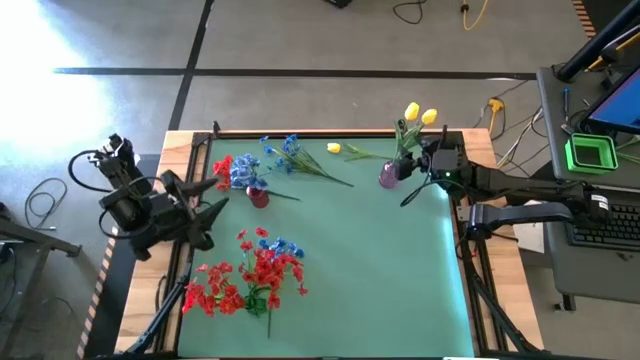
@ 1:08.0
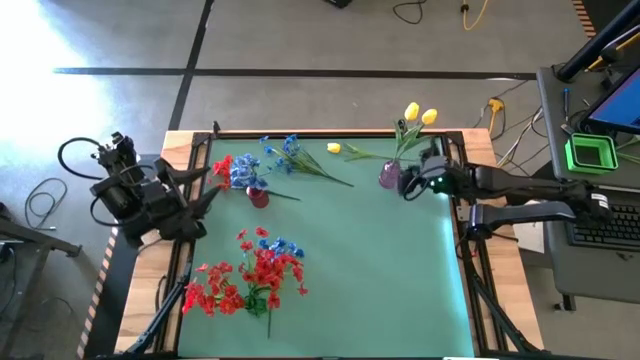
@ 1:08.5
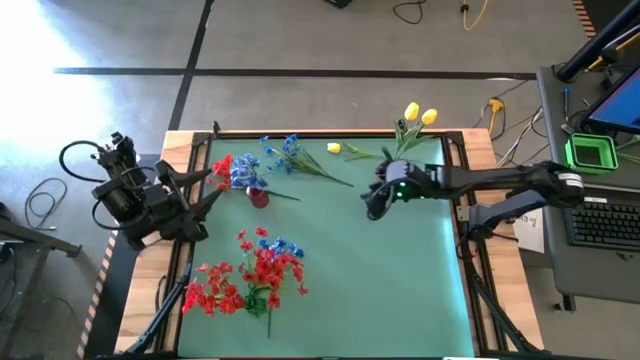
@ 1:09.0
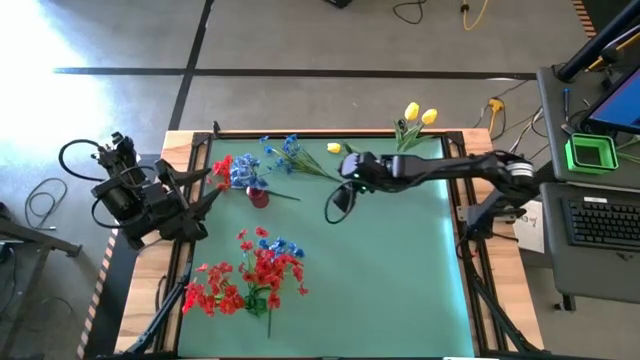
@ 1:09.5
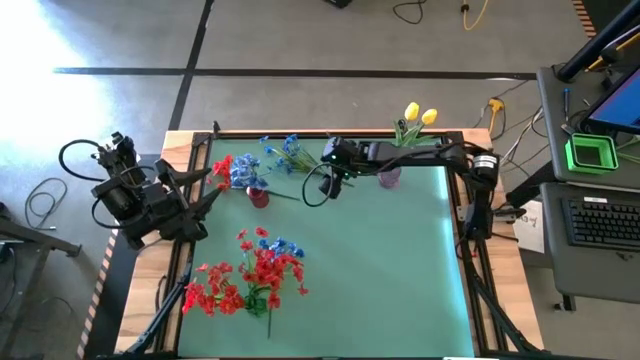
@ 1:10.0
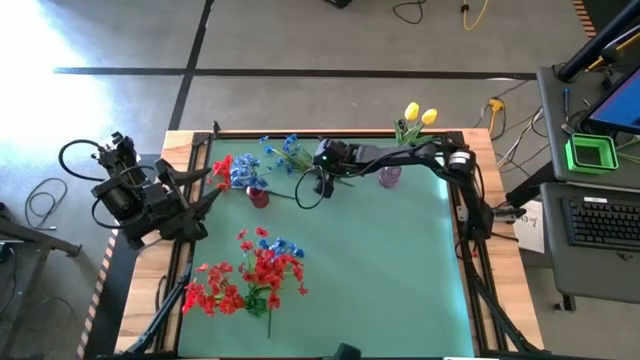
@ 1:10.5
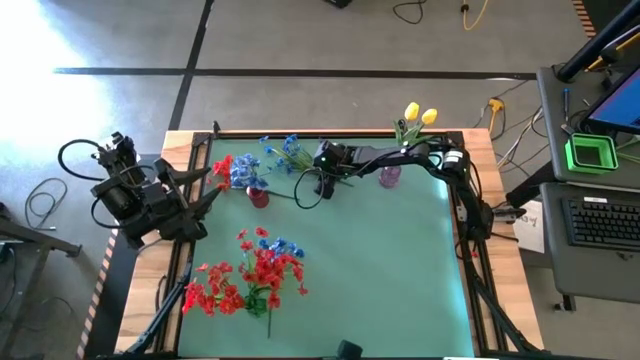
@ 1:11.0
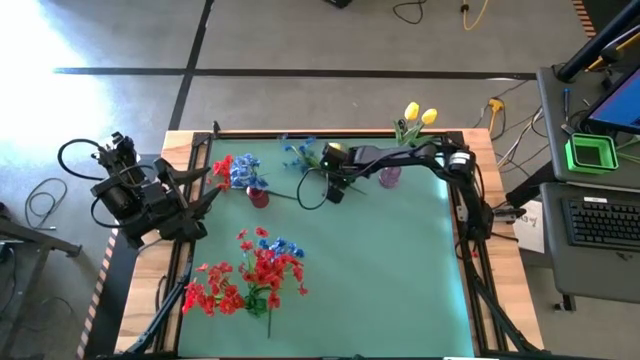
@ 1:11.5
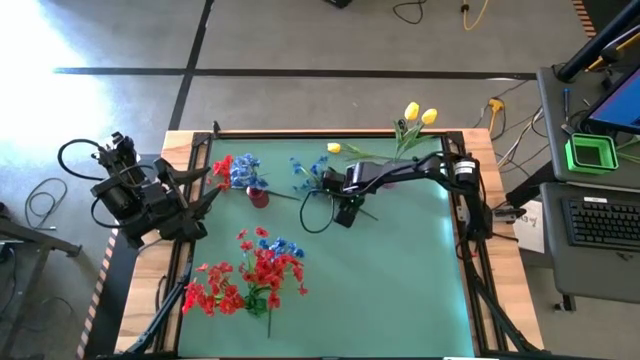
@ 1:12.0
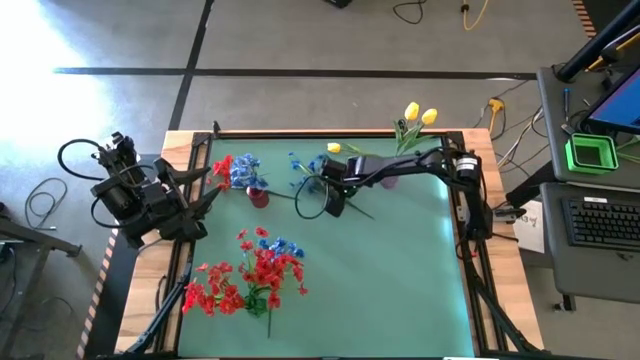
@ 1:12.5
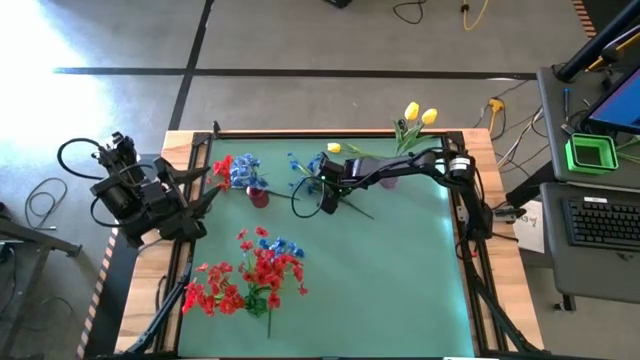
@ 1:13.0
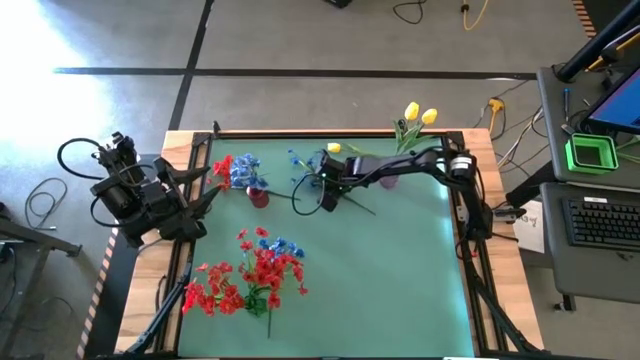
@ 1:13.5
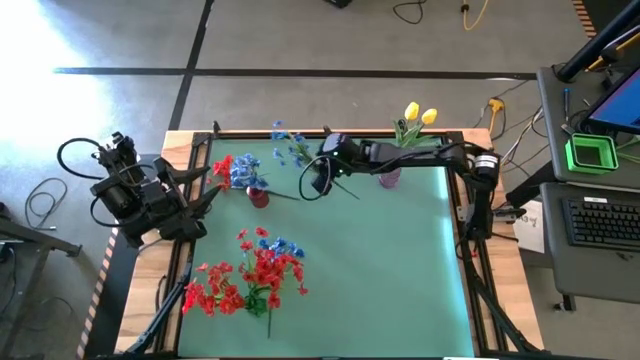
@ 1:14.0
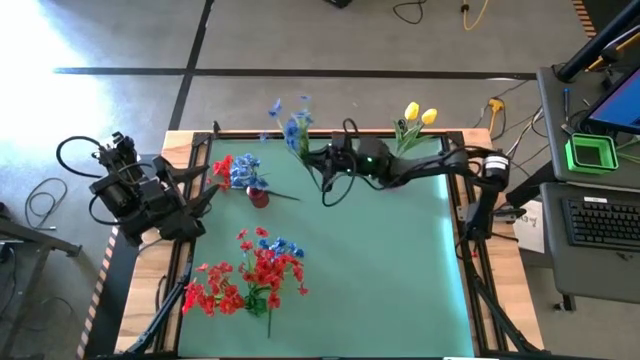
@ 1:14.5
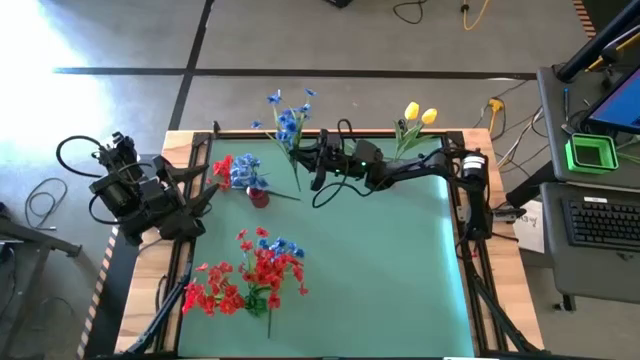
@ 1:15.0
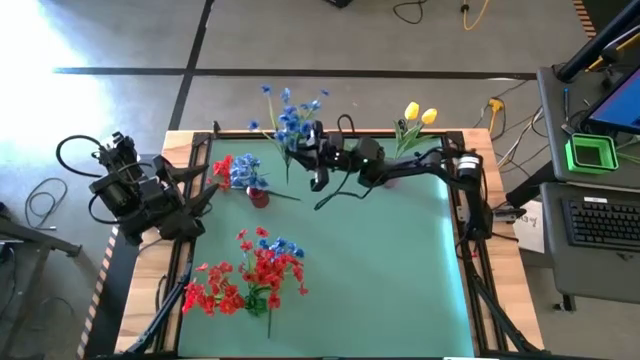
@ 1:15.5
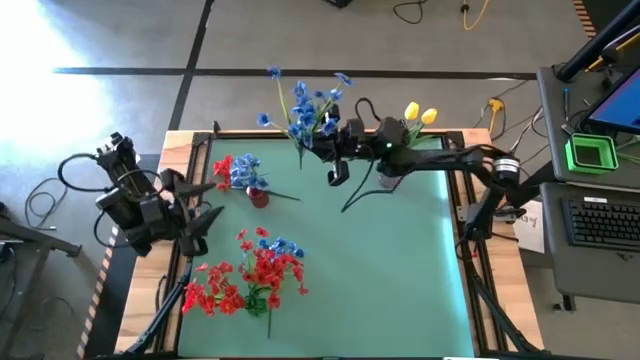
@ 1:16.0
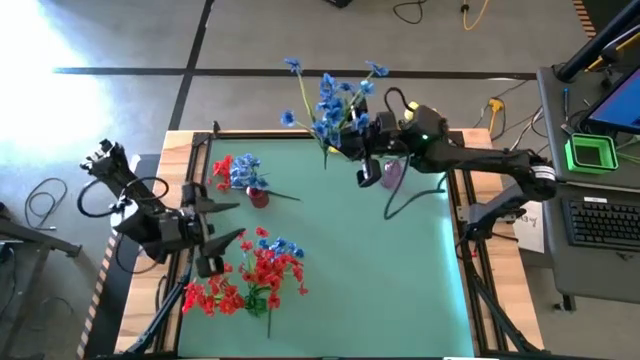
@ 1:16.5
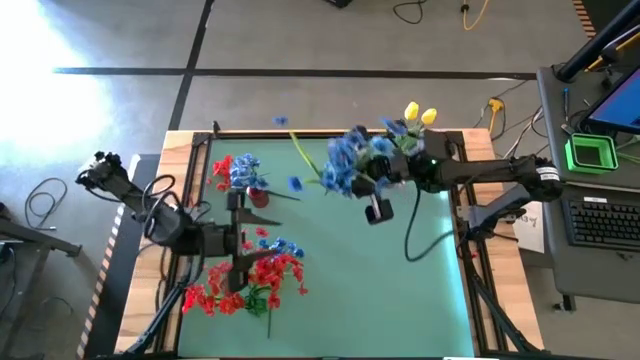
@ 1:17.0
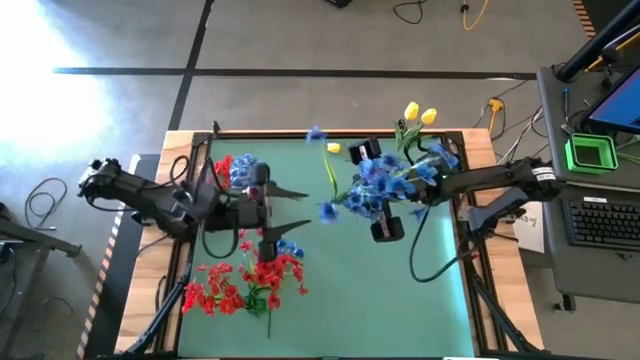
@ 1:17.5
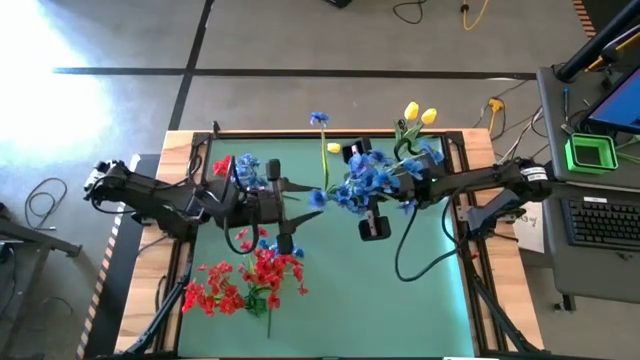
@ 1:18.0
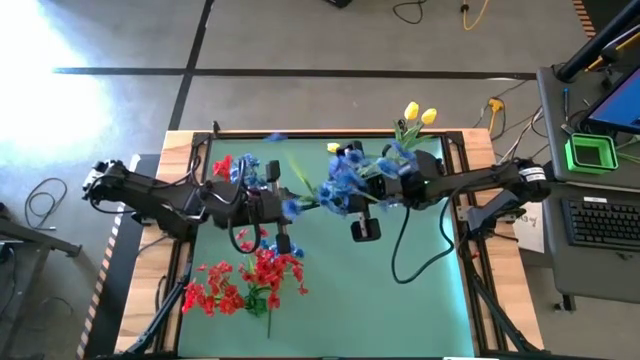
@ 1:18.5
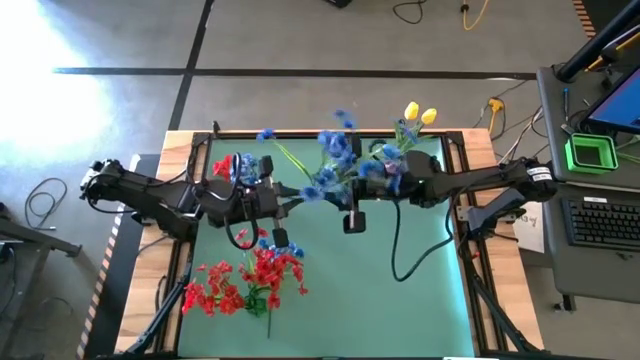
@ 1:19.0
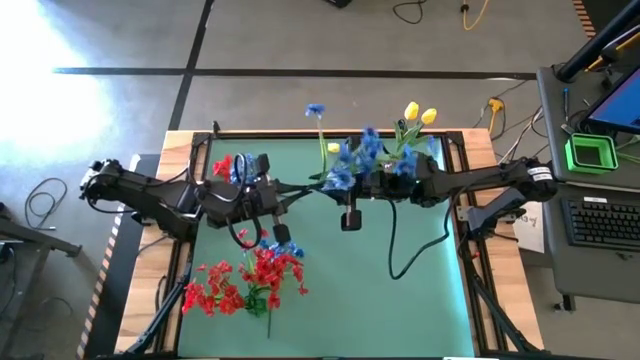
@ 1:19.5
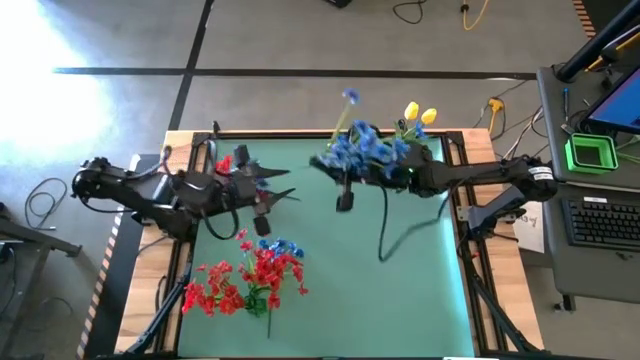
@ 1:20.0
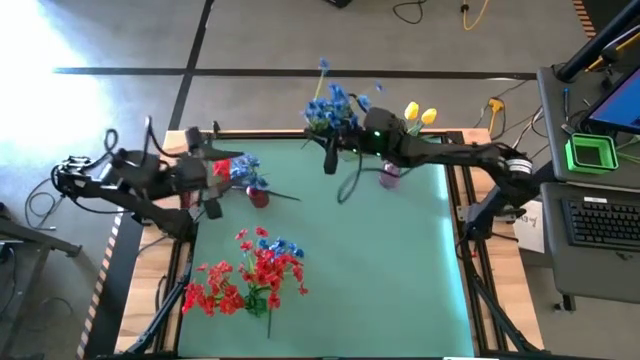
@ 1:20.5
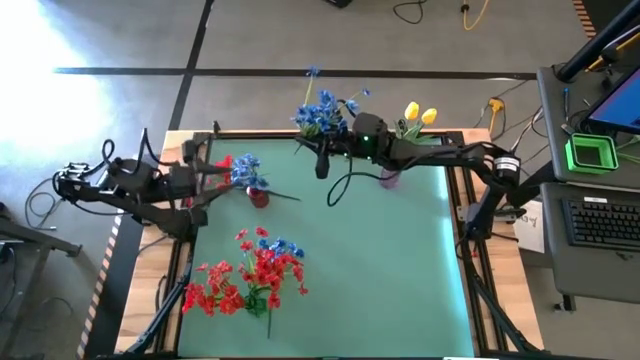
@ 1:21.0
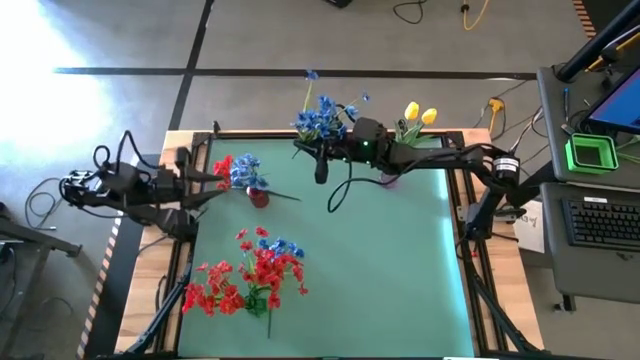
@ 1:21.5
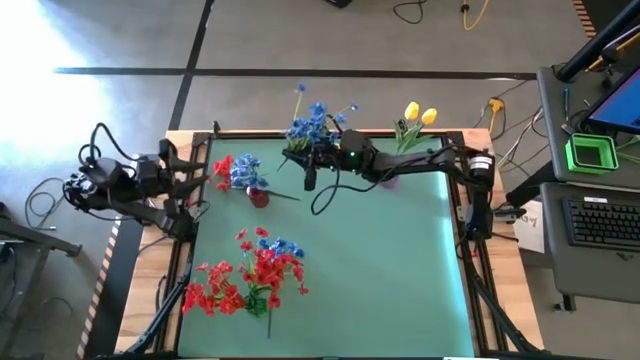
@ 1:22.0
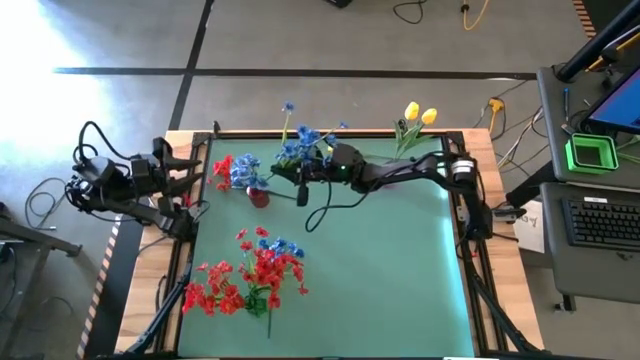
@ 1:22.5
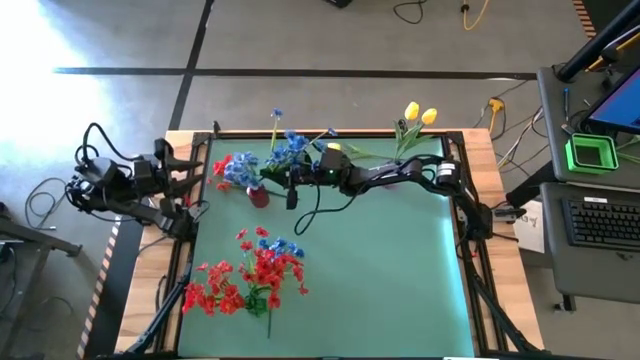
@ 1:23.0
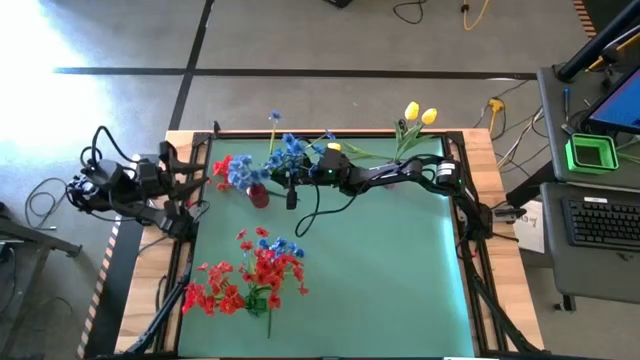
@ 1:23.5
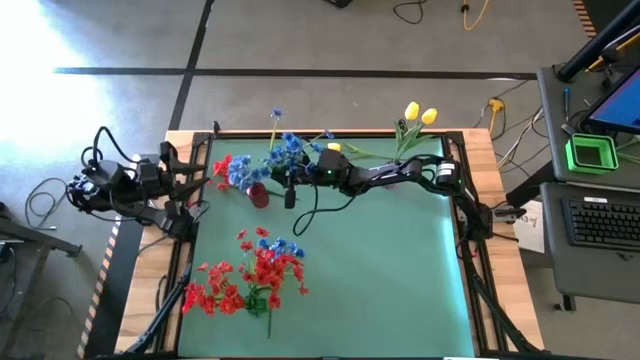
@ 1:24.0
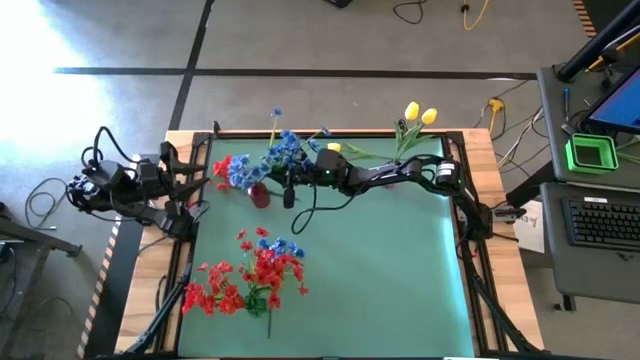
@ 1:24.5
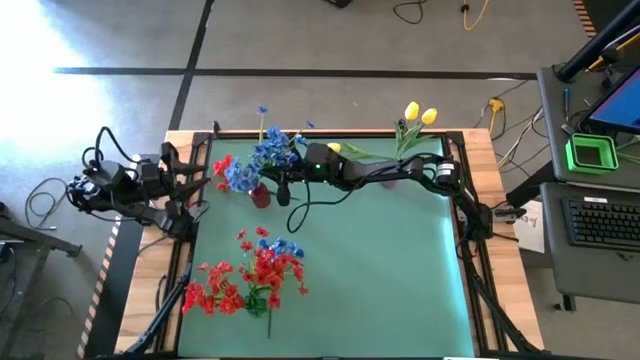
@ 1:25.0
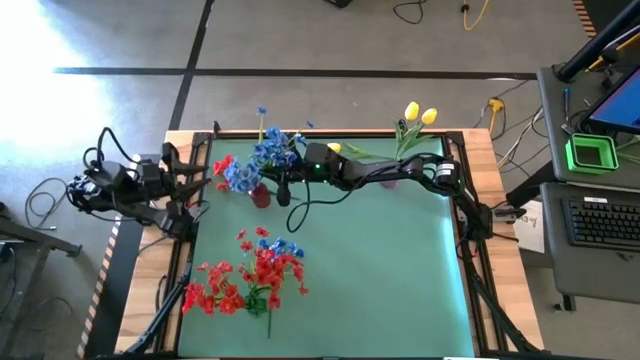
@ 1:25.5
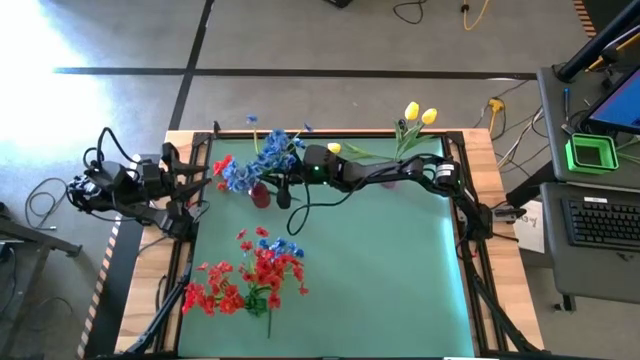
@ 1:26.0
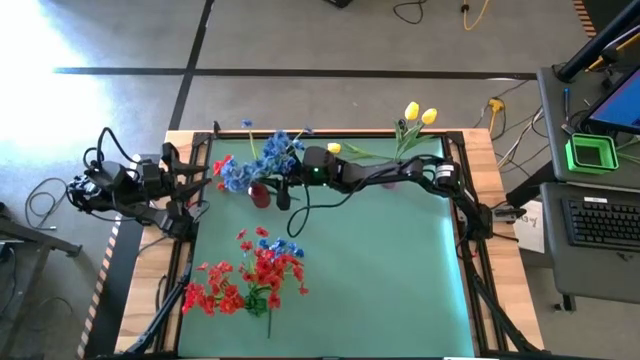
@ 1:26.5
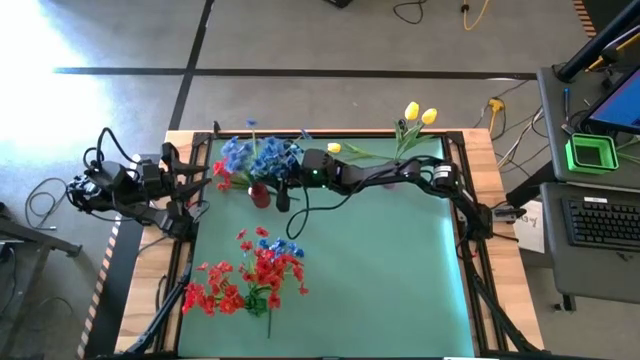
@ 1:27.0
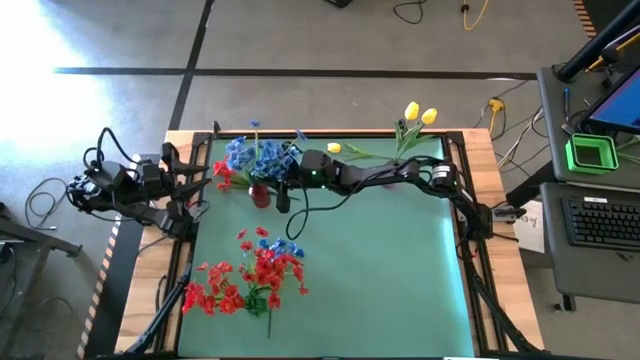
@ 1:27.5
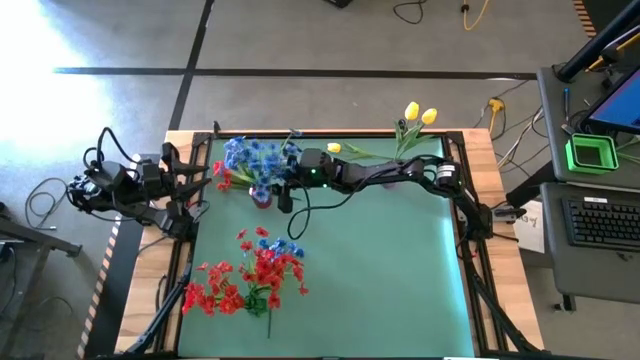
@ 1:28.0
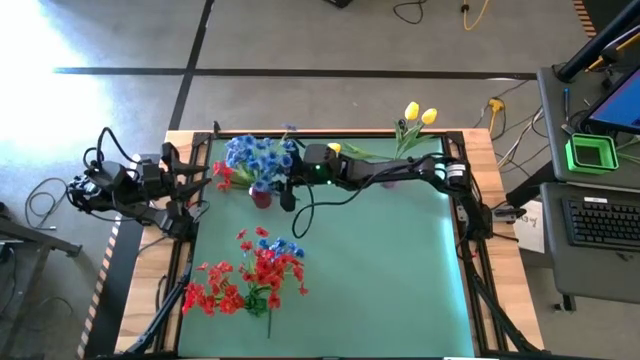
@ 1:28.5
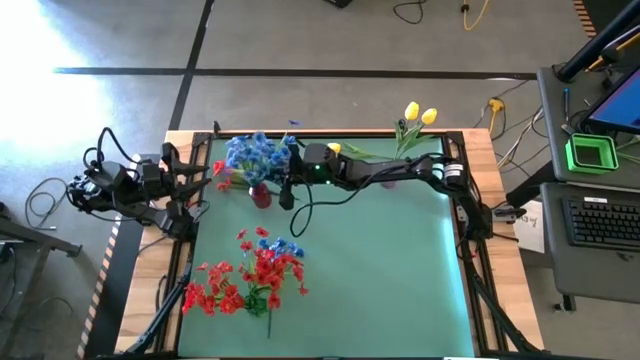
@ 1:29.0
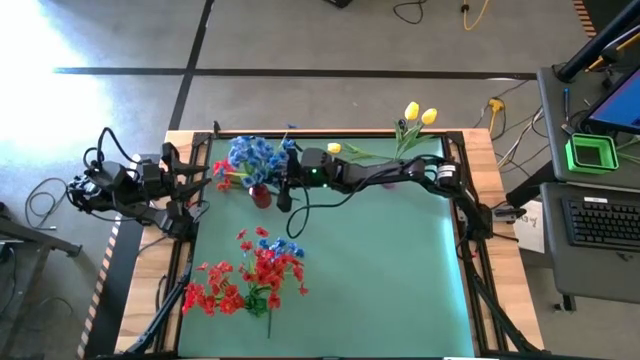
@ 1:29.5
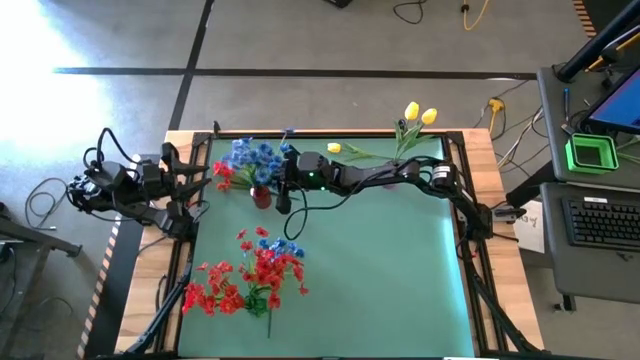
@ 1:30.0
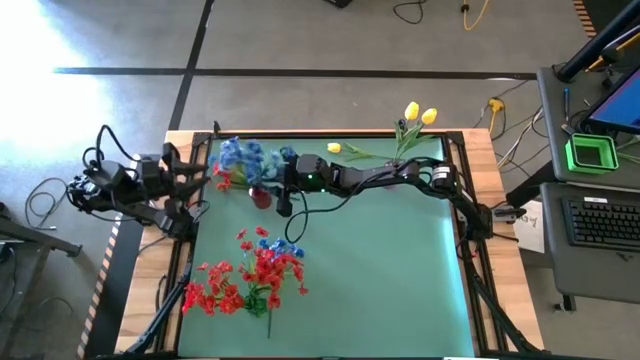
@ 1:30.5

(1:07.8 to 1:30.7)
Task: Sort flowers into vase by color
Put the top blue flower into the red vase
